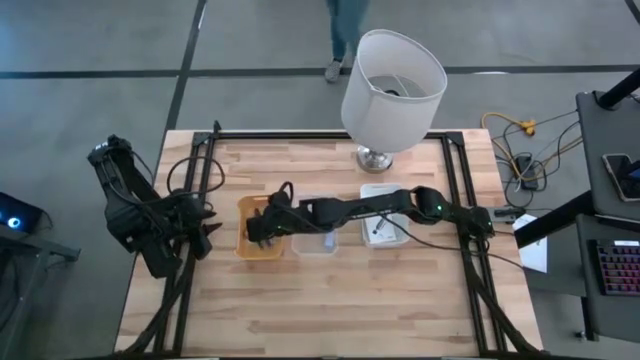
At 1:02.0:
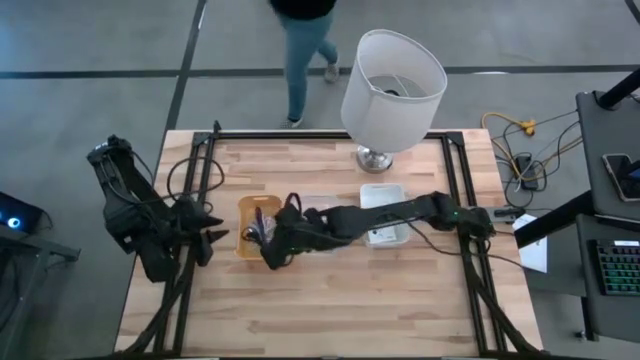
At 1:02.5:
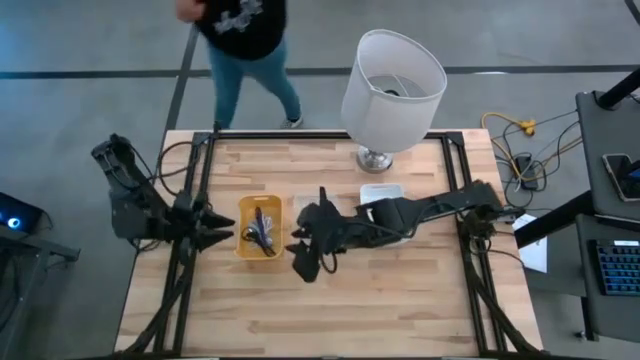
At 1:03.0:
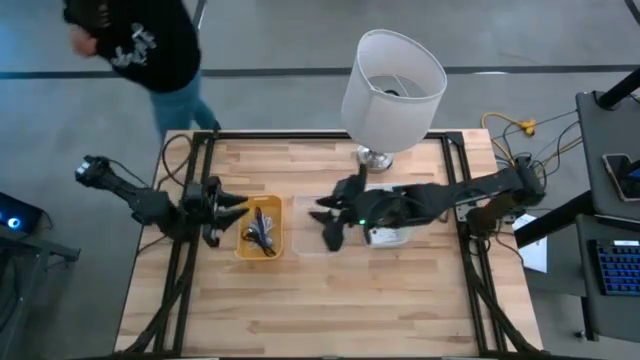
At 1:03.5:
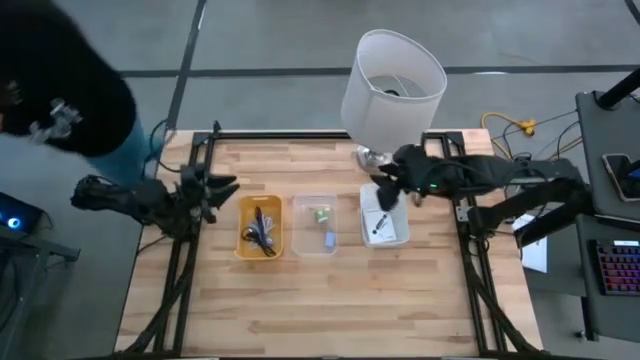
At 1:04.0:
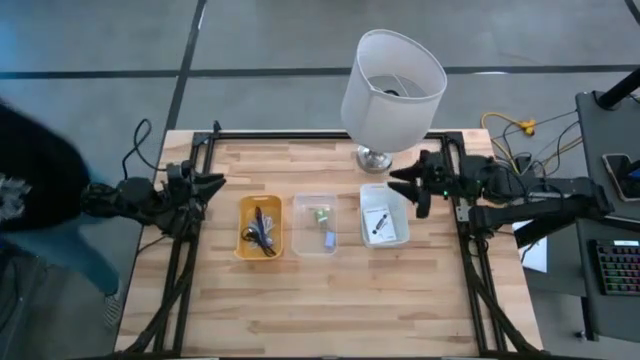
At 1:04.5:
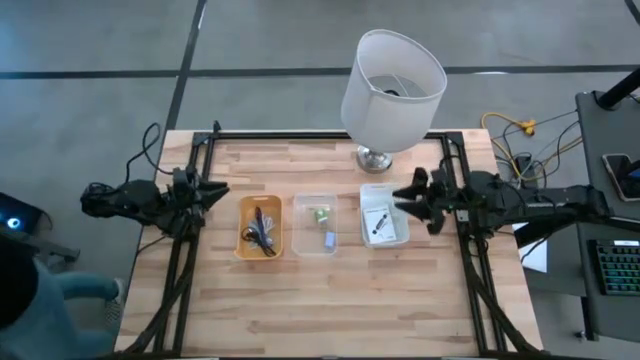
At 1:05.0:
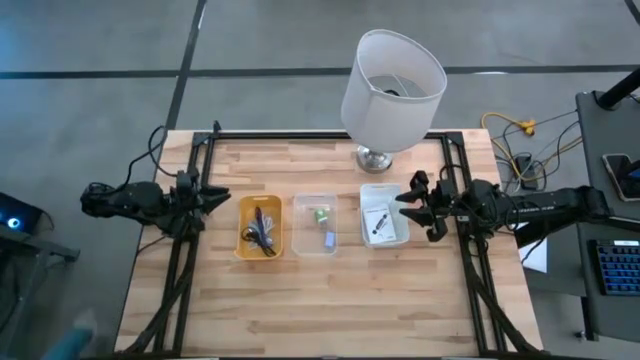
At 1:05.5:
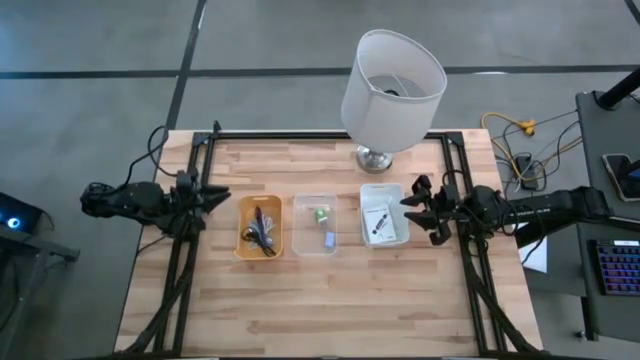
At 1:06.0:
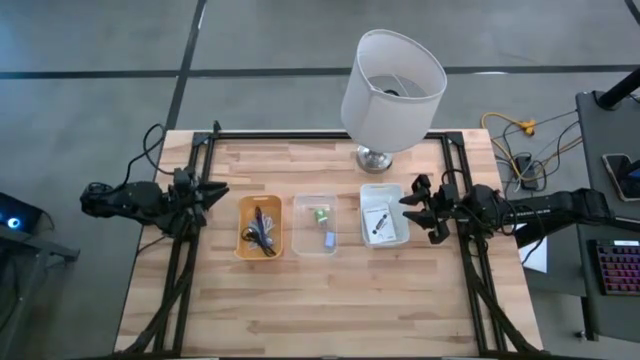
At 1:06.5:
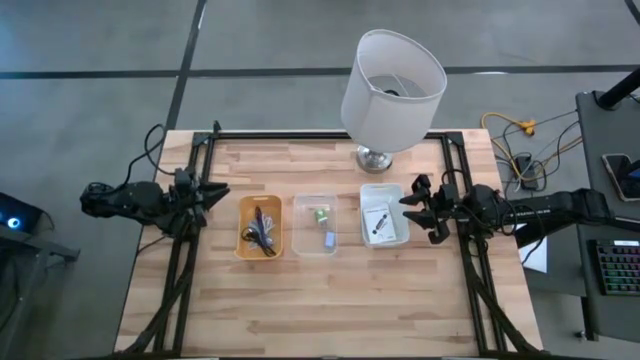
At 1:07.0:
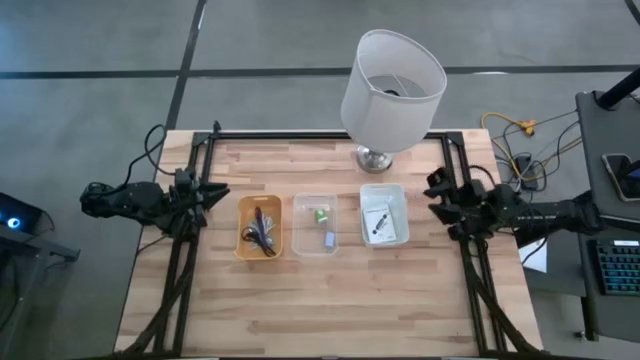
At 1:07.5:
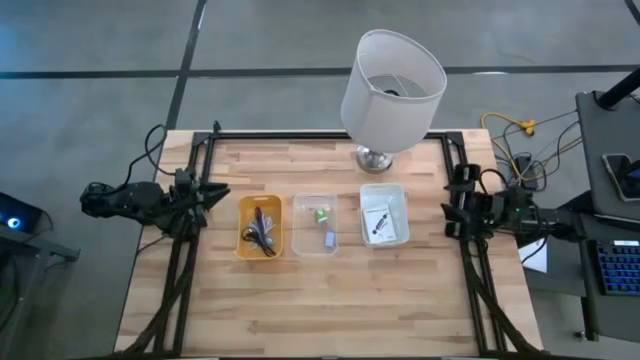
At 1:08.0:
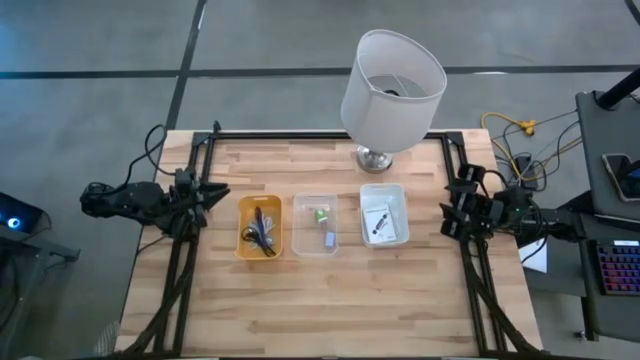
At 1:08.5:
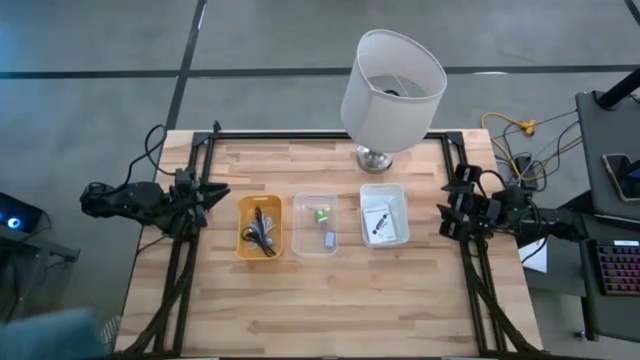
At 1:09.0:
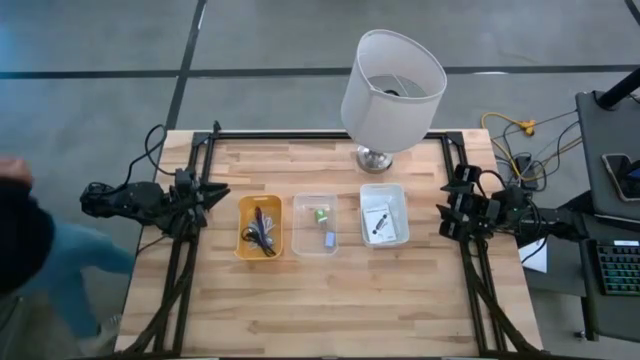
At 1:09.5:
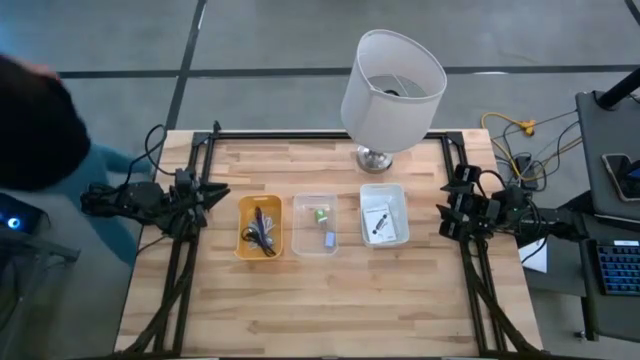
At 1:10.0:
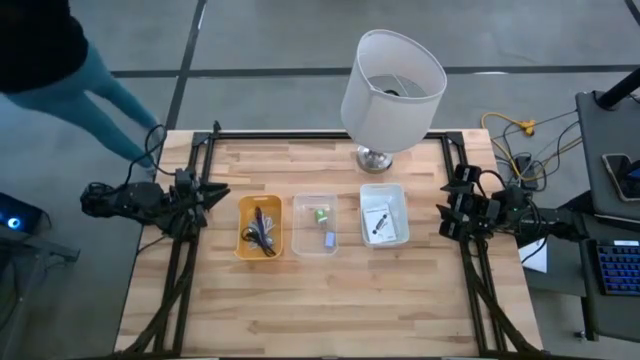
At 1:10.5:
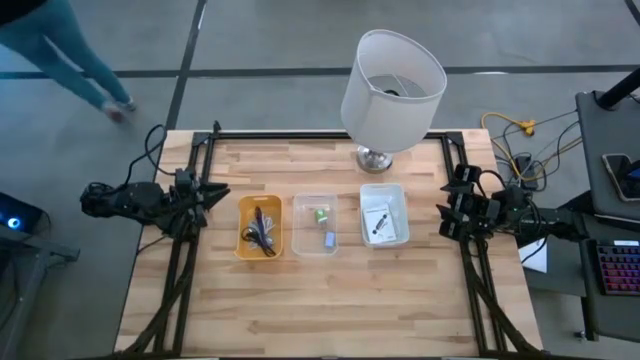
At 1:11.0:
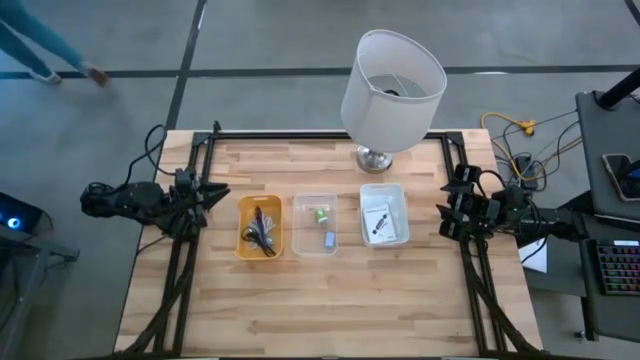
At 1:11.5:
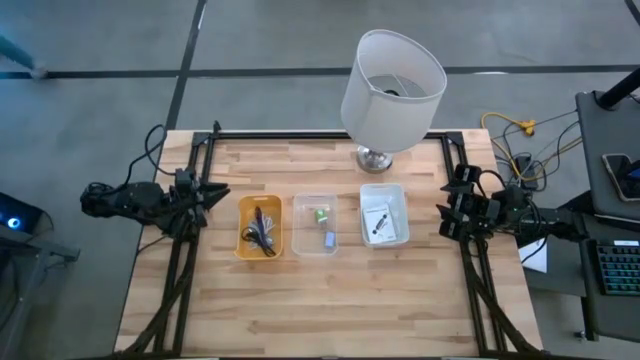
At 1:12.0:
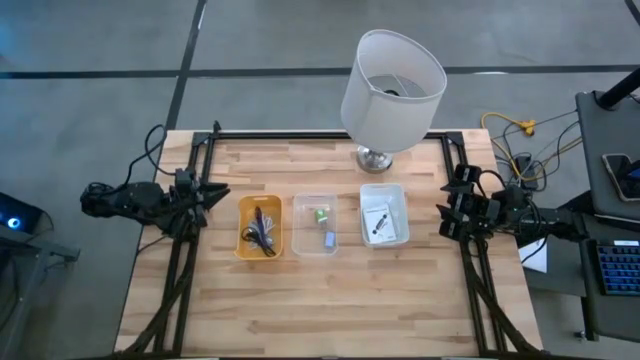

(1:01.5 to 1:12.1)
Task: Pick and place items into bin
Return to Home Position

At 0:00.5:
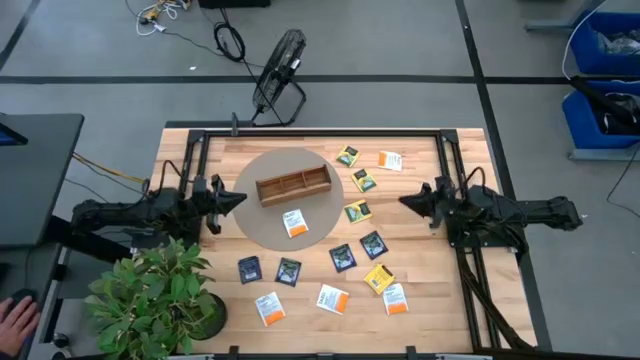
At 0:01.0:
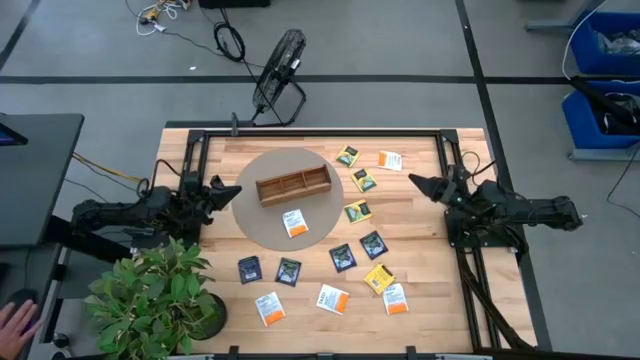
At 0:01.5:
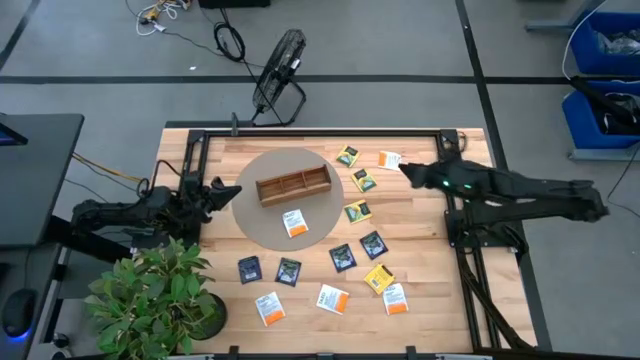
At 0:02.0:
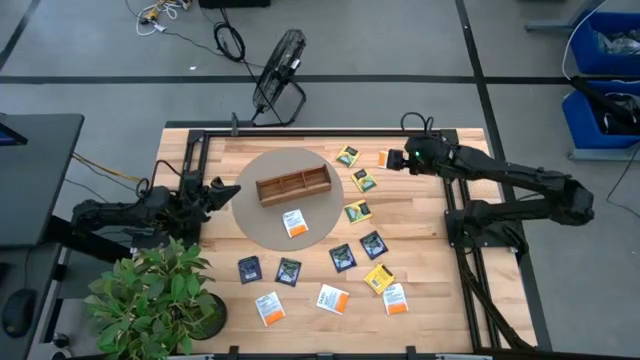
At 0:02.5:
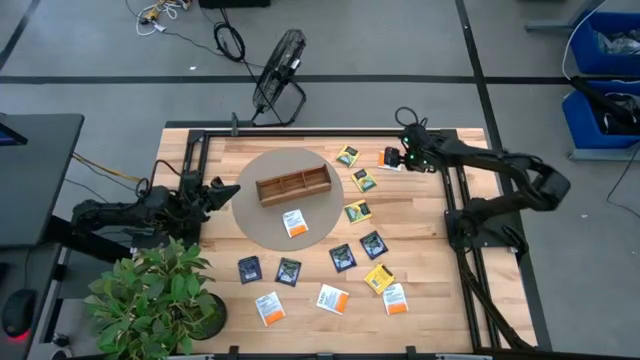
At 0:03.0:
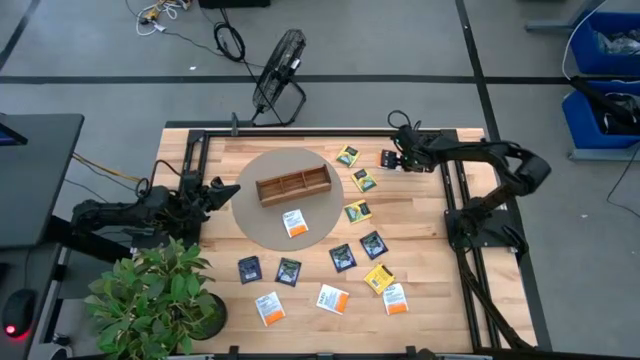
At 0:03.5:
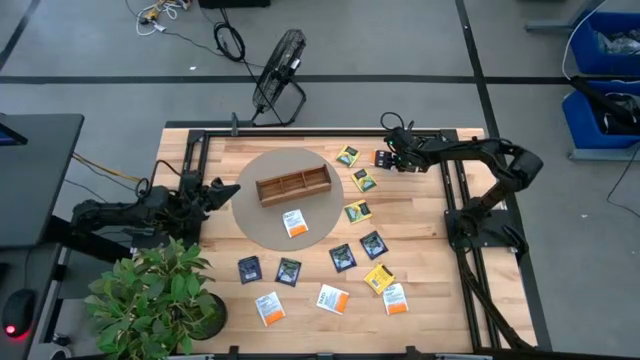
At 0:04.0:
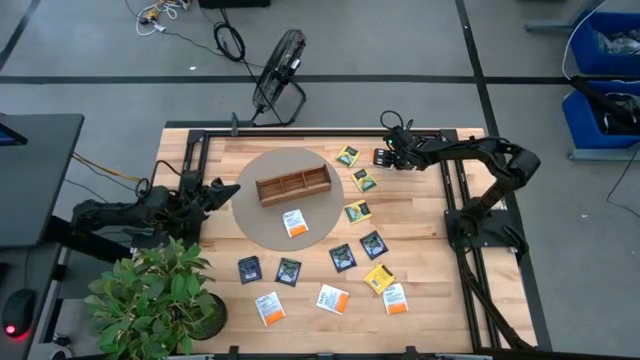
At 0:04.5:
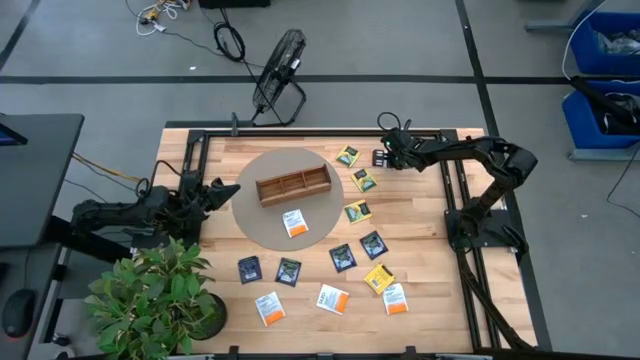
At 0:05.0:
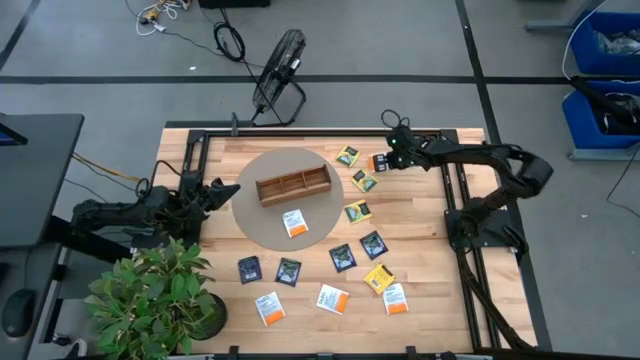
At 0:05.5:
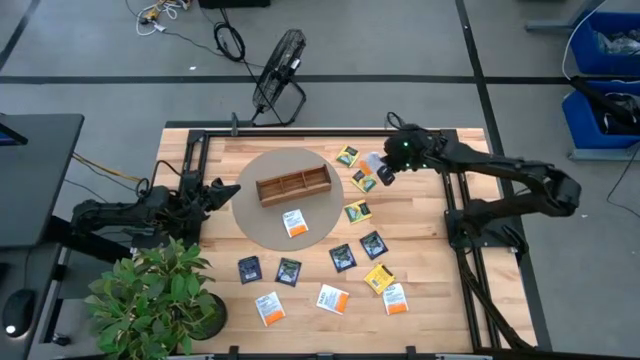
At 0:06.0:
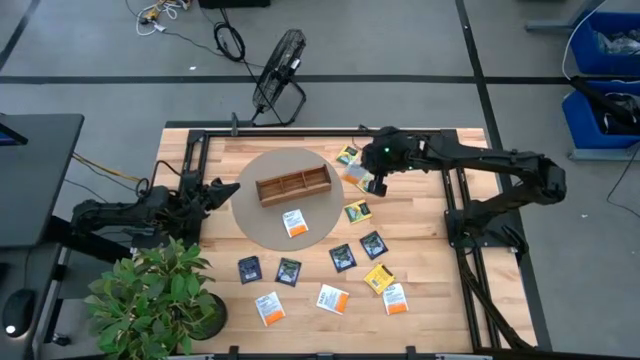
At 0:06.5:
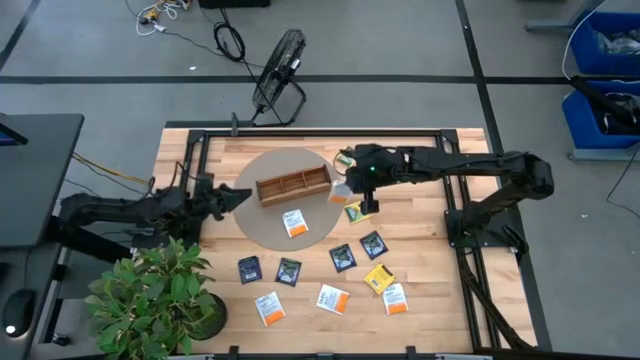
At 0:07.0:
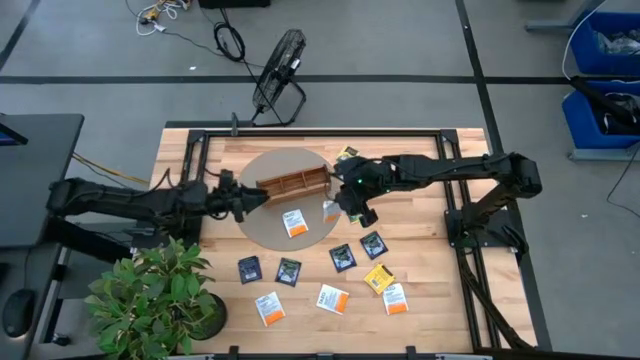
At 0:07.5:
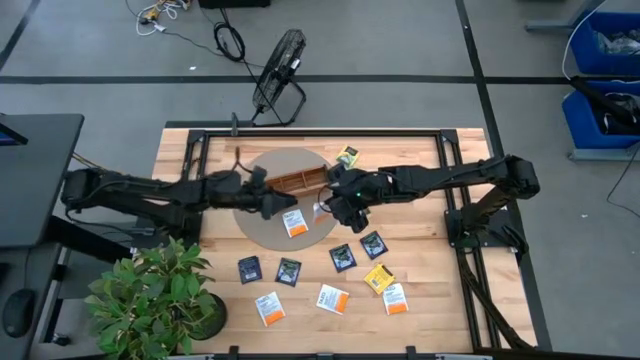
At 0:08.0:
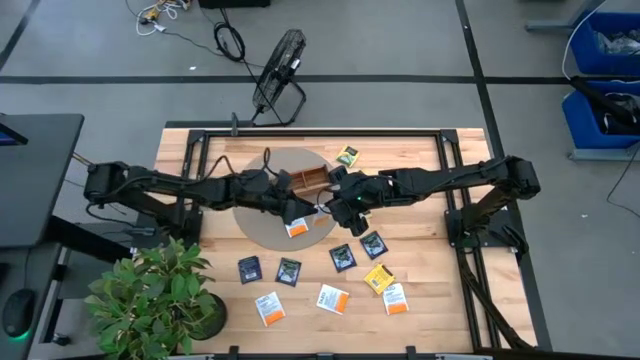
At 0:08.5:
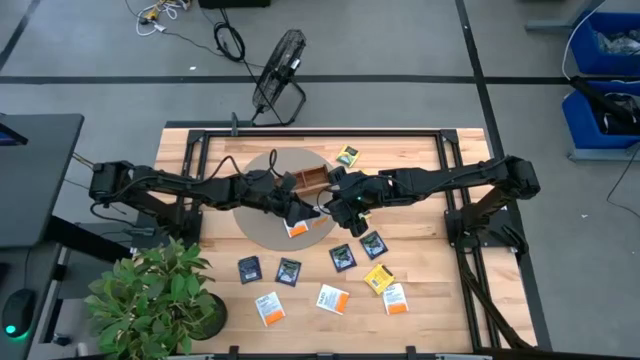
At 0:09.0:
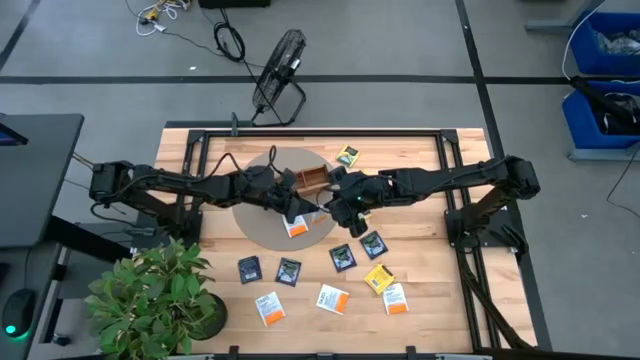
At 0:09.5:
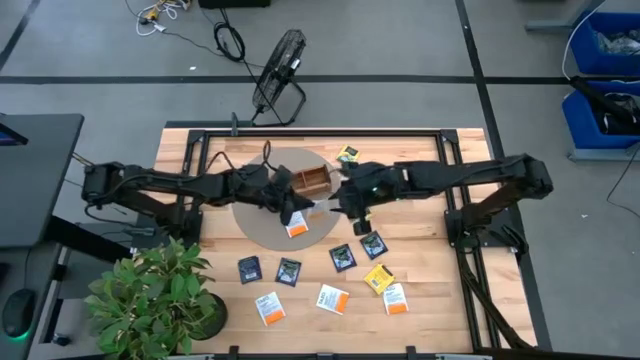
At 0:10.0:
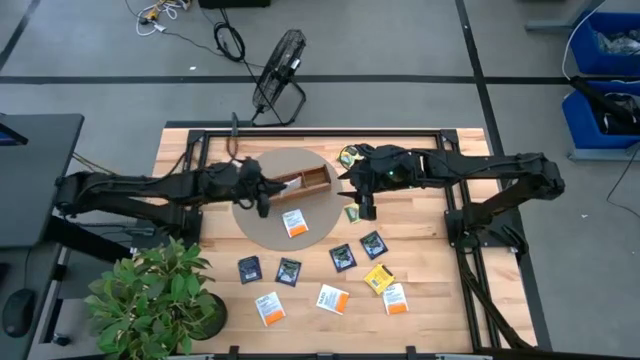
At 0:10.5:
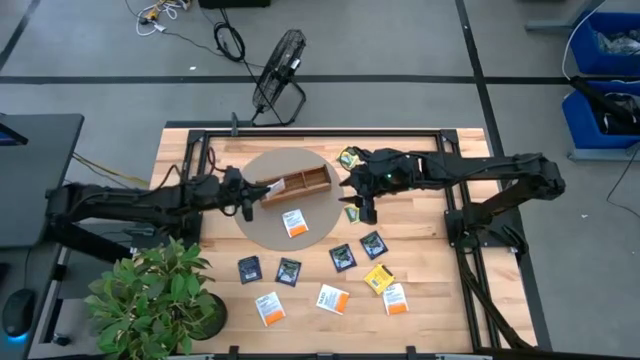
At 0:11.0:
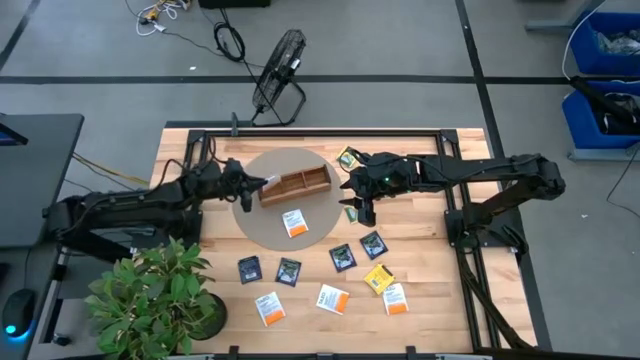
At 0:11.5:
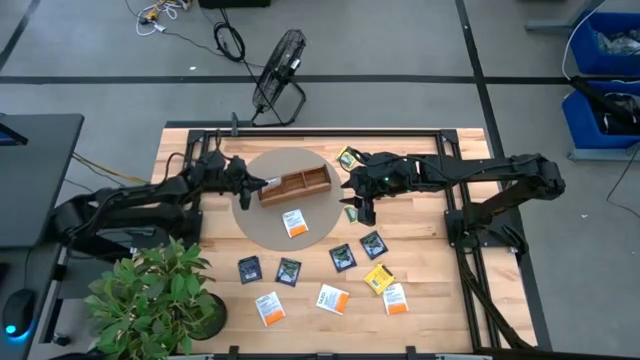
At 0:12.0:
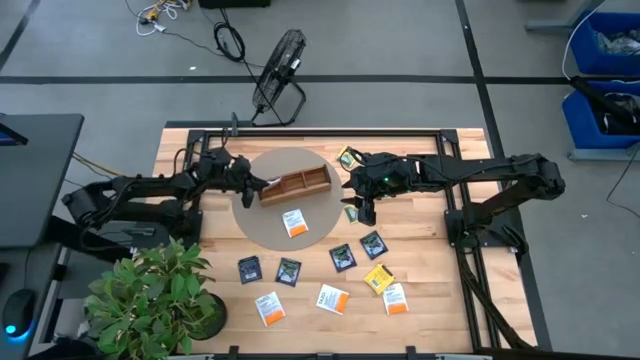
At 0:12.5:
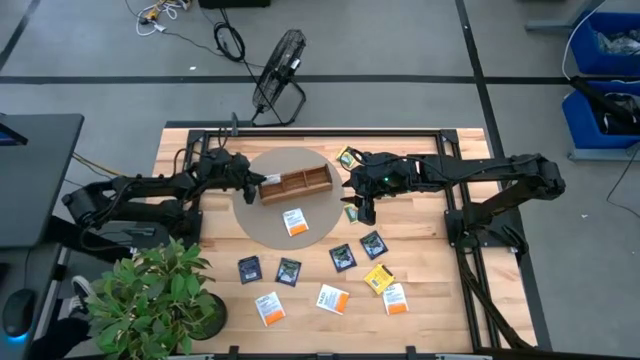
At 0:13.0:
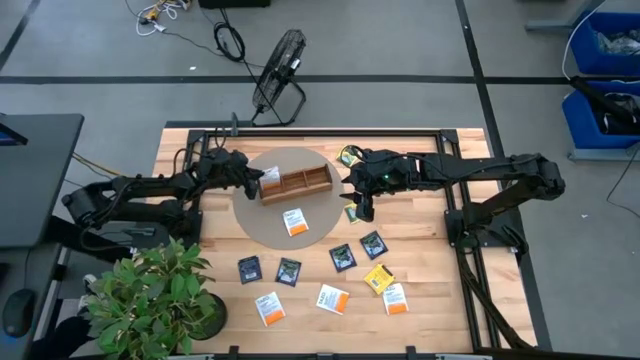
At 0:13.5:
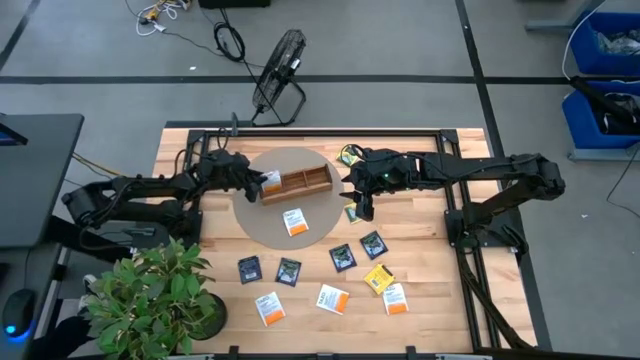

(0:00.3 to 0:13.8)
Task: Pick & Place Tea
Put the white tea bag into the left section of the wooden organizer
